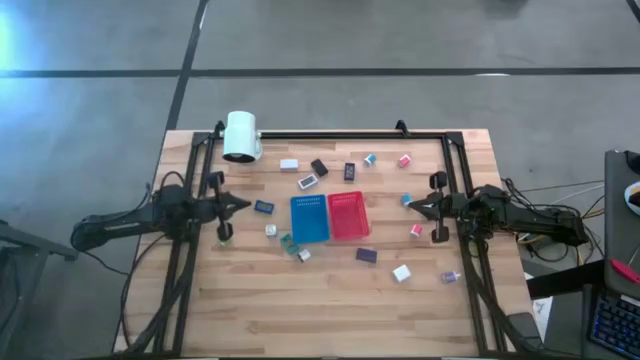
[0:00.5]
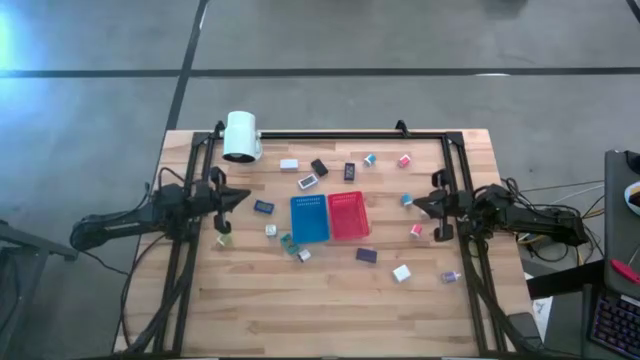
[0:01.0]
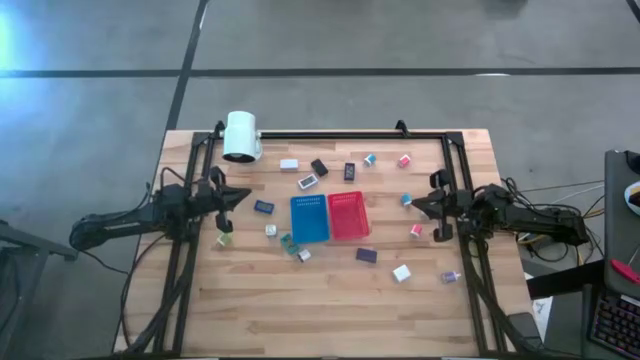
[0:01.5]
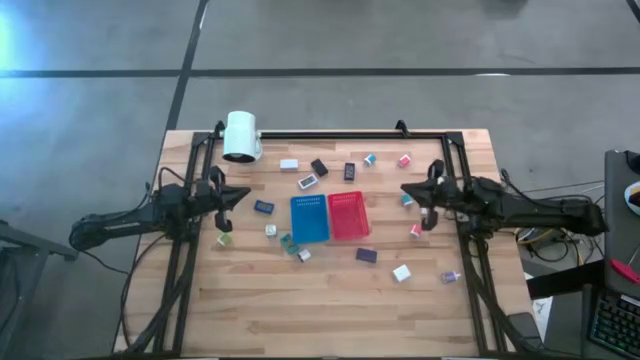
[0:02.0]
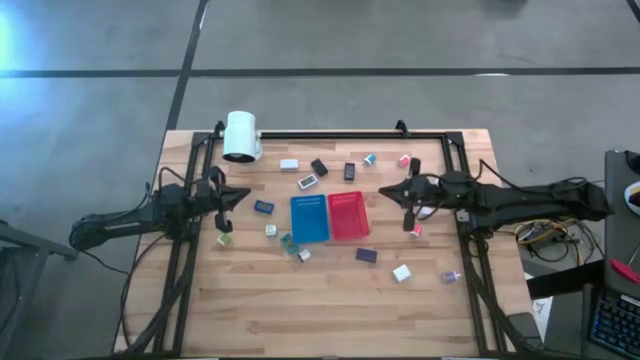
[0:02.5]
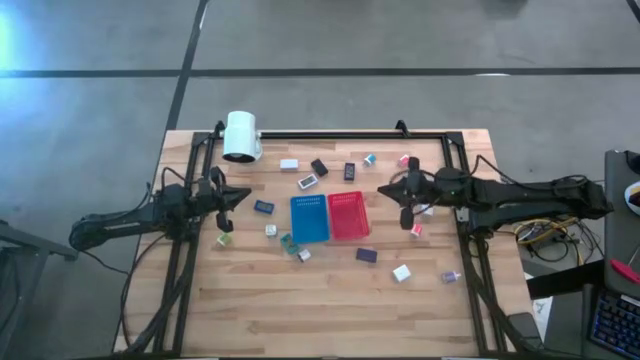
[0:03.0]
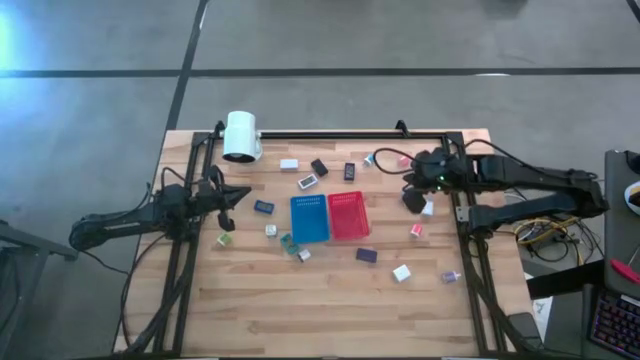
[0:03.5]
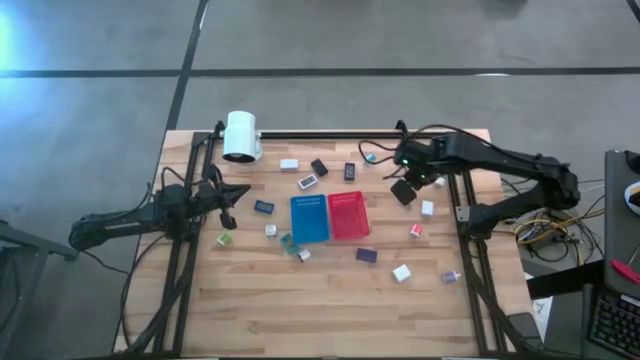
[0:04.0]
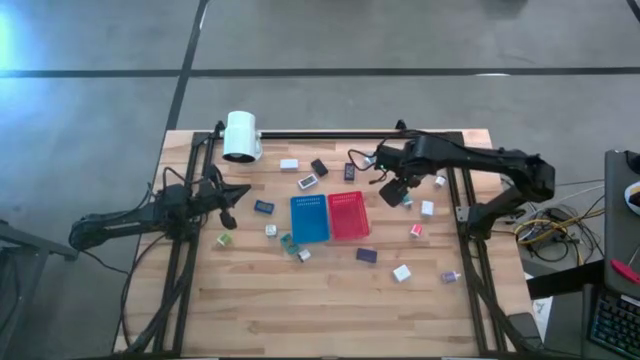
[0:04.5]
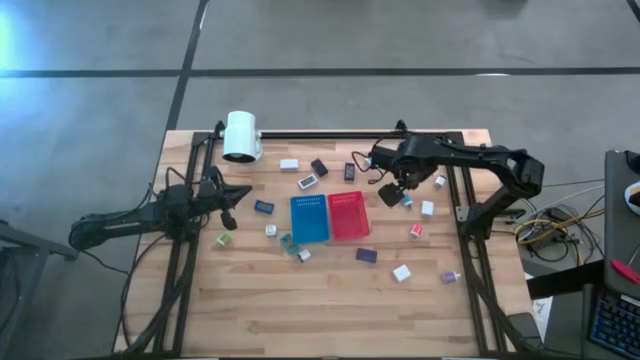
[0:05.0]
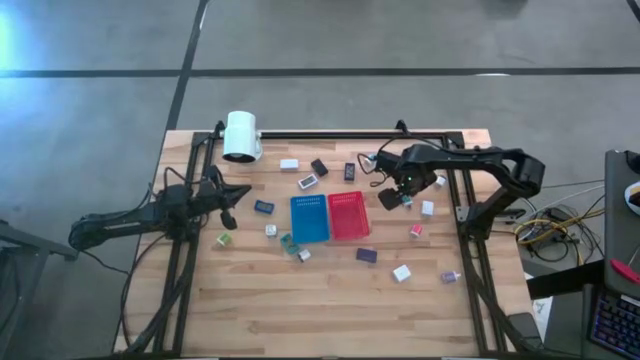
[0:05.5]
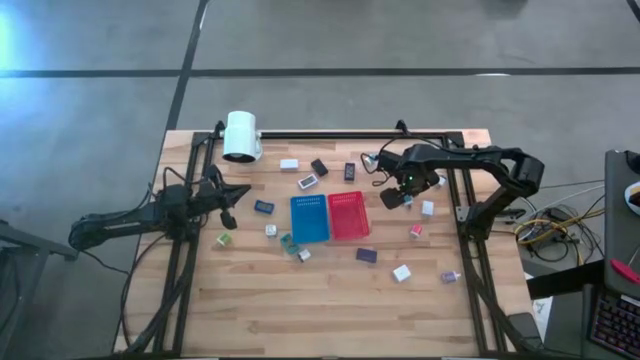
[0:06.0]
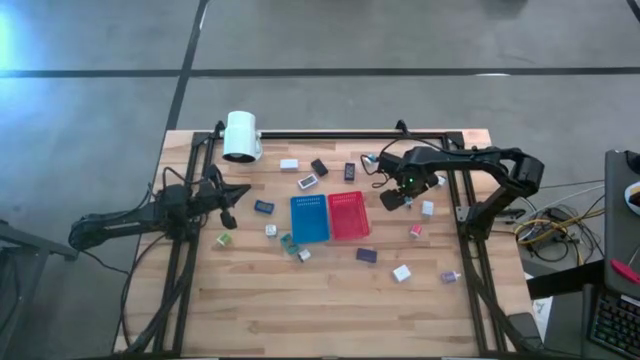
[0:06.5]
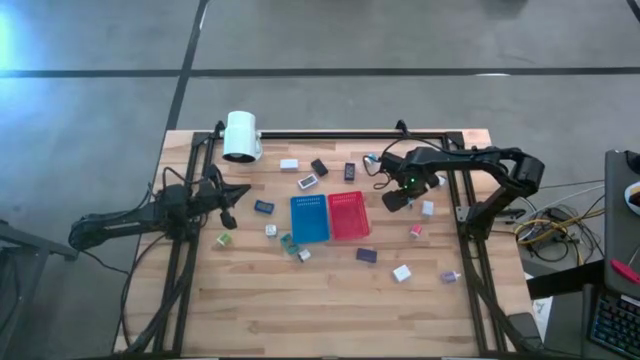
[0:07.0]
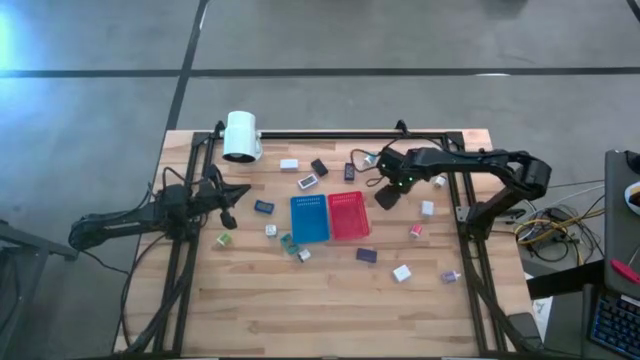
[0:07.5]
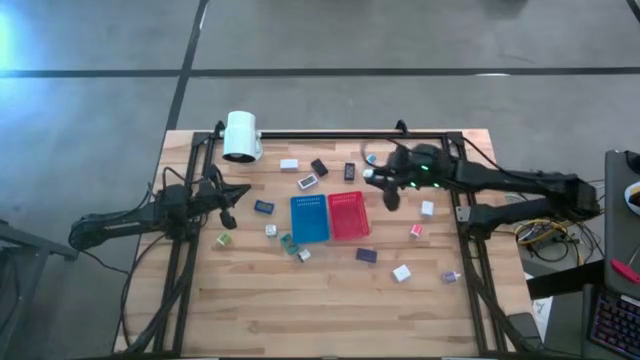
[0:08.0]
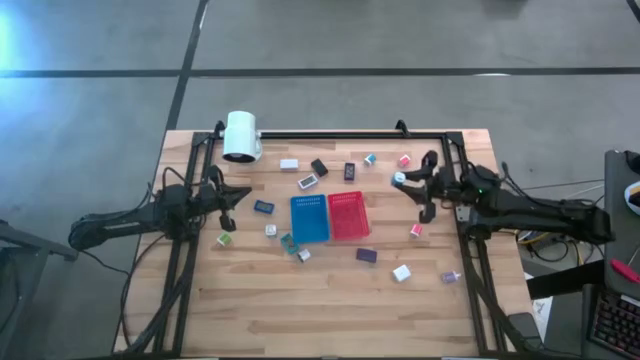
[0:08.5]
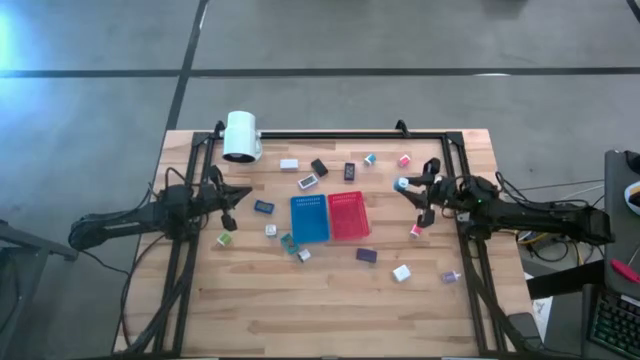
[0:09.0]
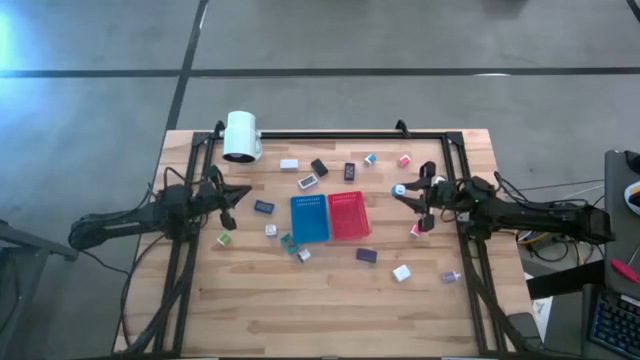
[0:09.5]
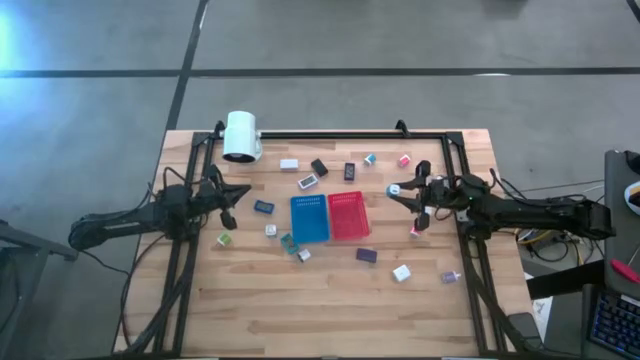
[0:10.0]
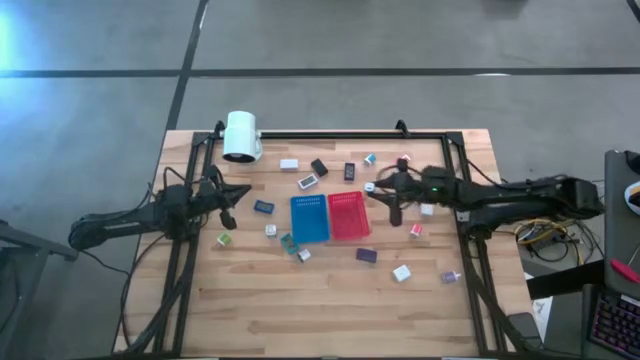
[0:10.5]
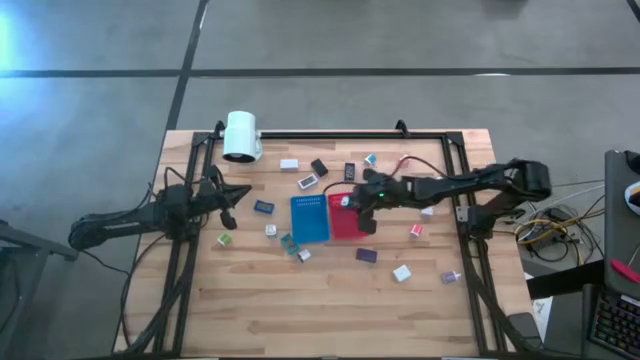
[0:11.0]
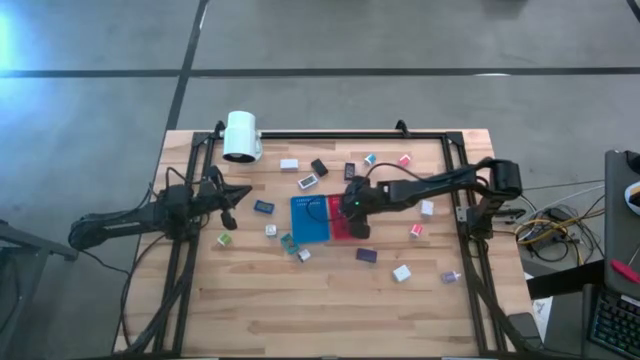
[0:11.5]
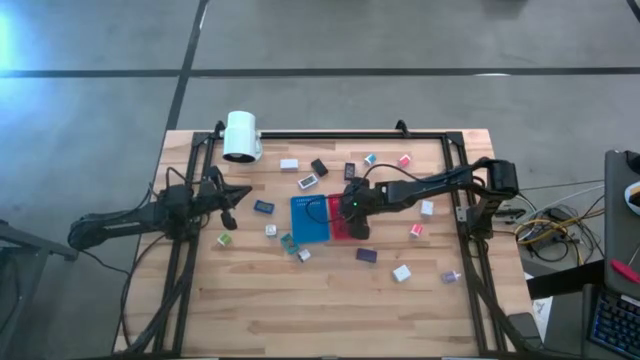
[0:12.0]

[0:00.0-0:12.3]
Task: Pick & Place Office items
Put the right light blue plug into the red bin

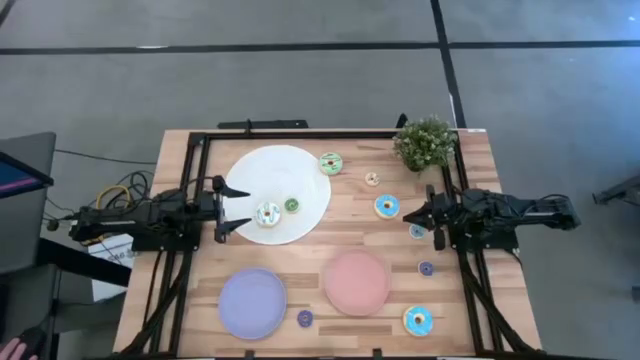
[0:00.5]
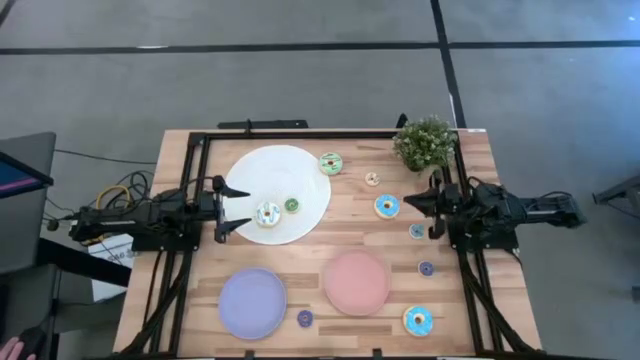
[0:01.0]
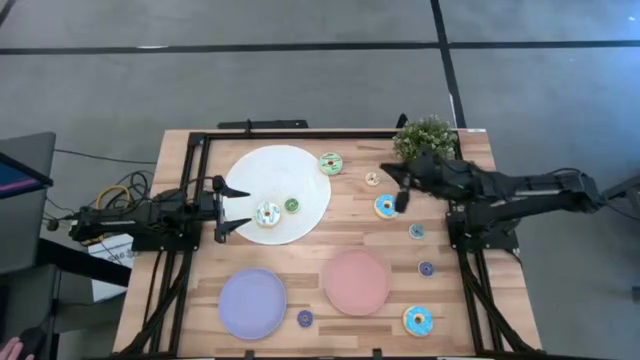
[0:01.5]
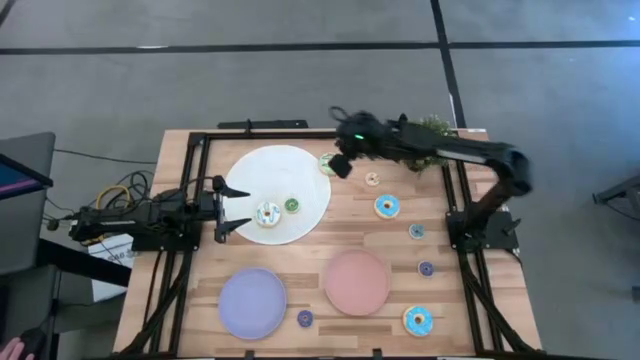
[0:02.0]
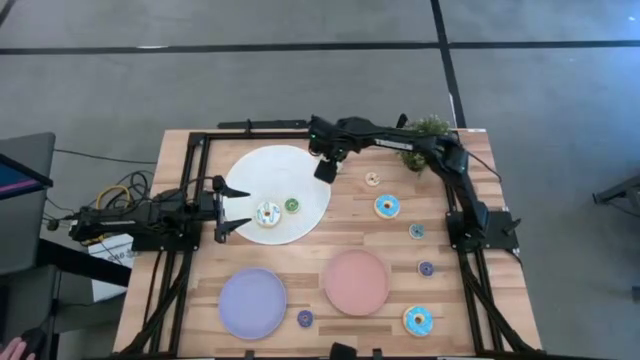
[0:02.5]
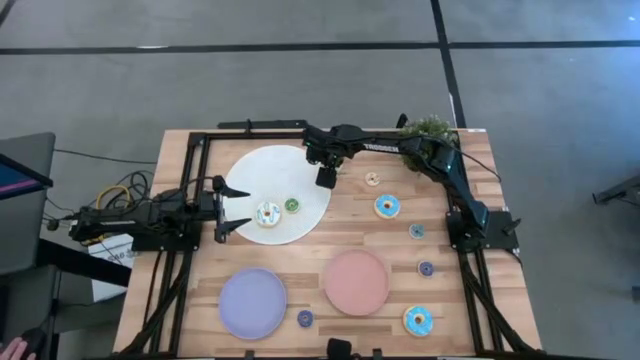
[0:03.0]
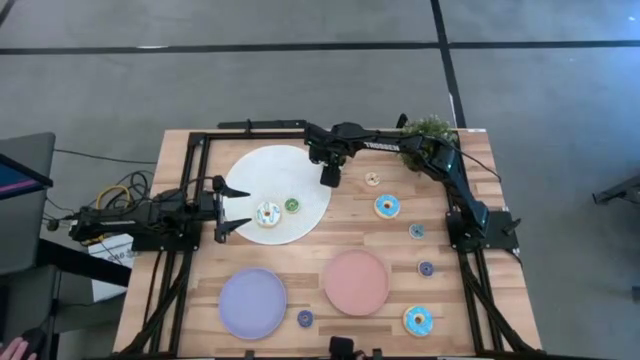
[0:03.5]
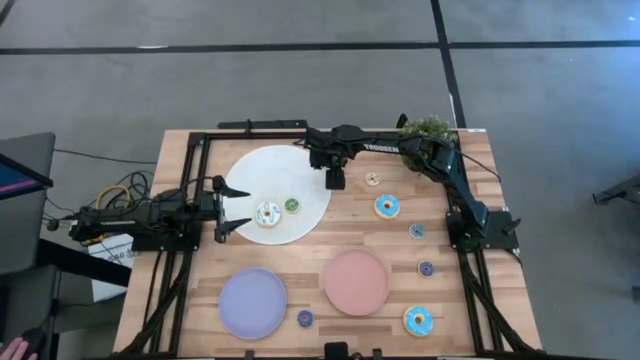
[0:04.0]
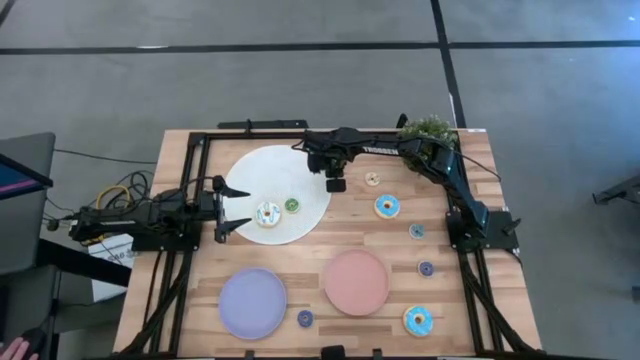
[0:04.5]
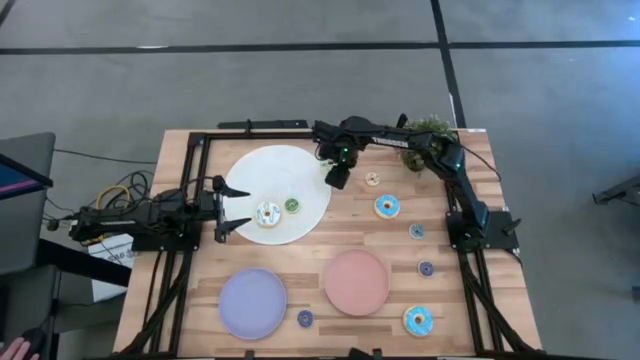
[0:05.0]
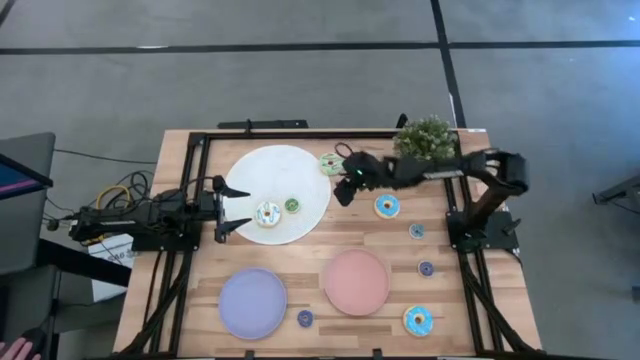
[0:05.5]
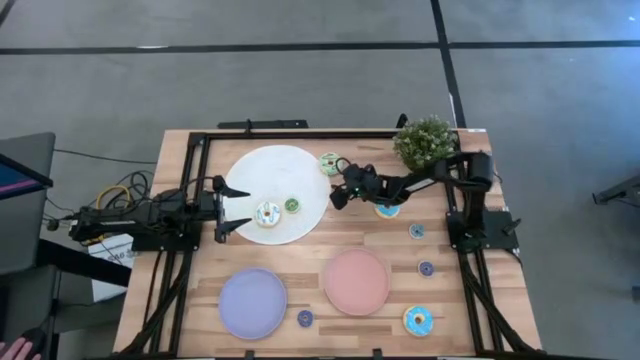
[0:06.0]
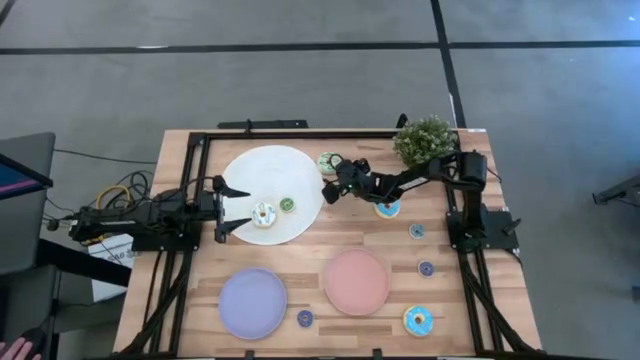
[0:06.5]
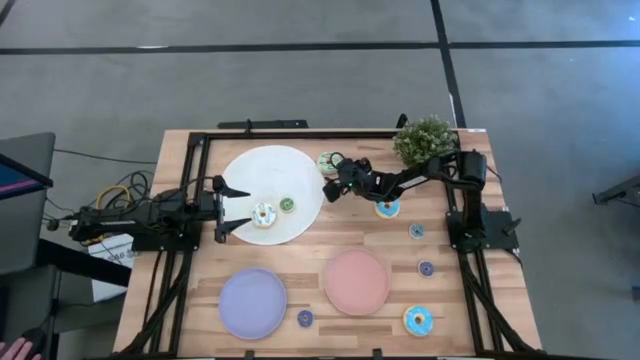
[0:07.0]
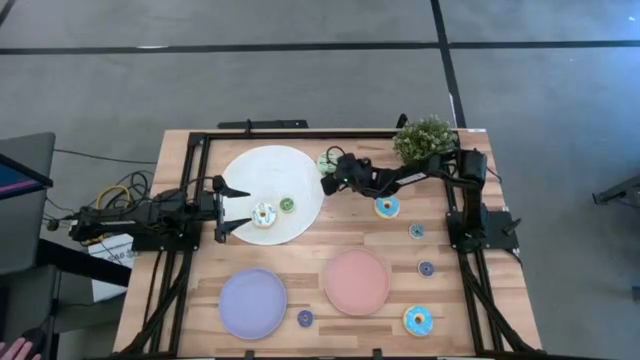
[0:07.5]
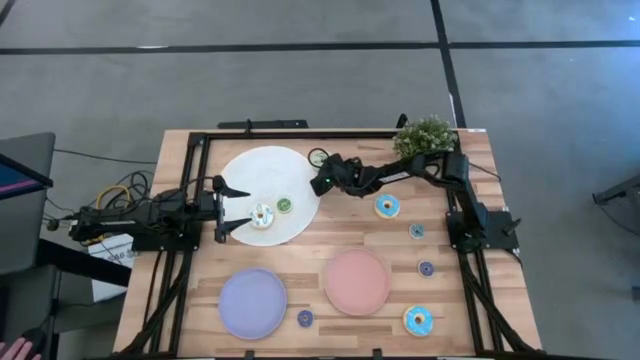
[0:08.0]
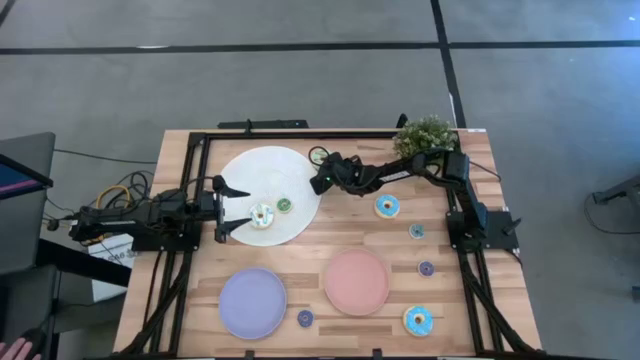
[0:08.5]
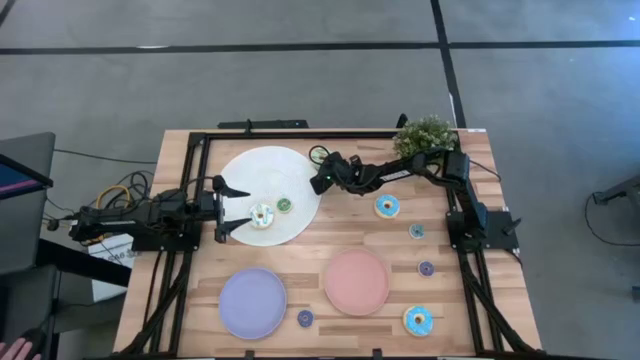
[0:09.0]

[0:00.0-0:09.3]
Task: Pick & Place donuts
Put the large green donut on the pink plate
